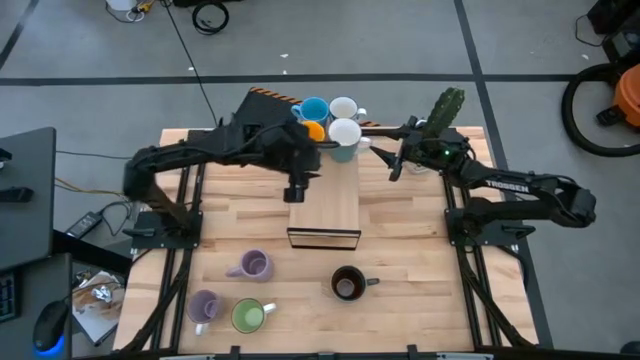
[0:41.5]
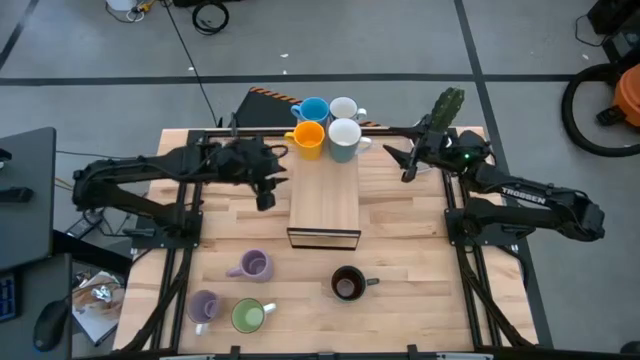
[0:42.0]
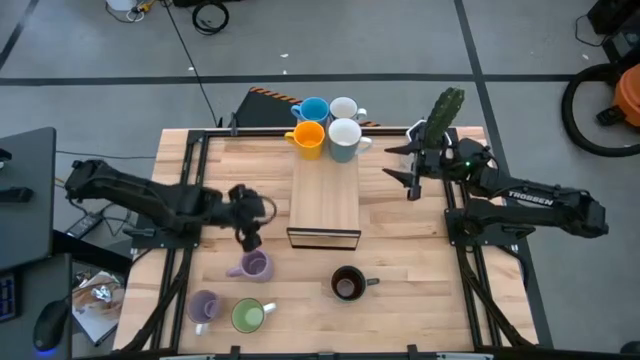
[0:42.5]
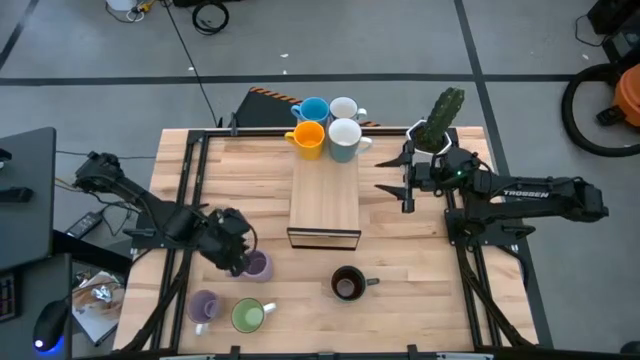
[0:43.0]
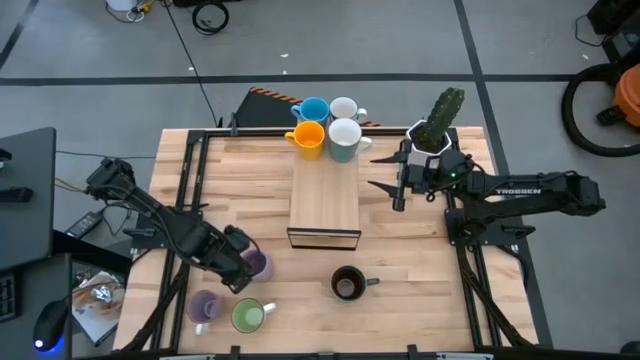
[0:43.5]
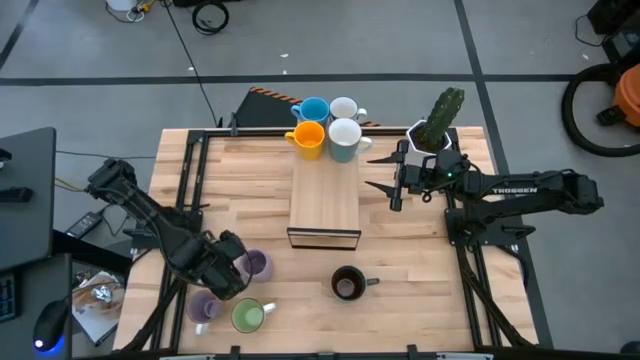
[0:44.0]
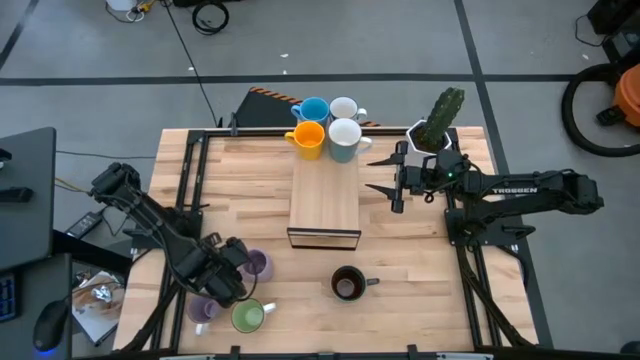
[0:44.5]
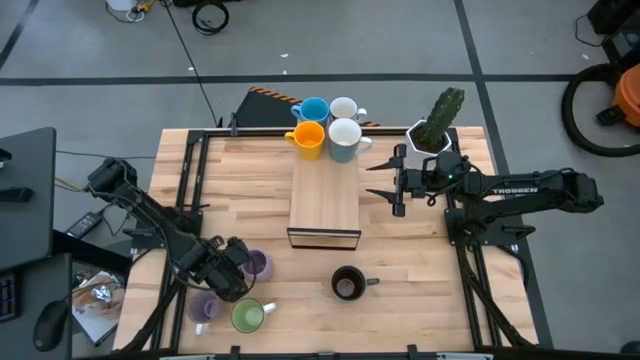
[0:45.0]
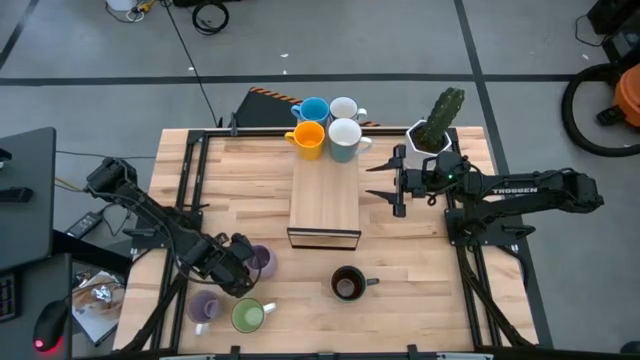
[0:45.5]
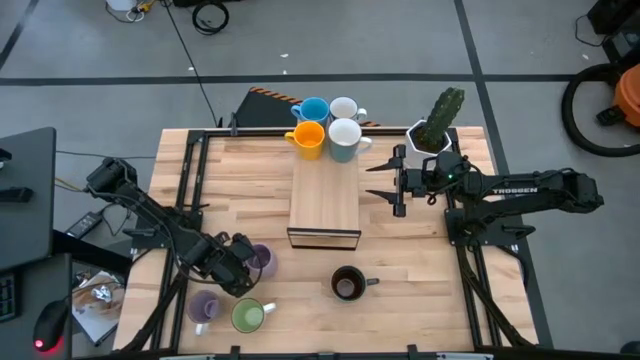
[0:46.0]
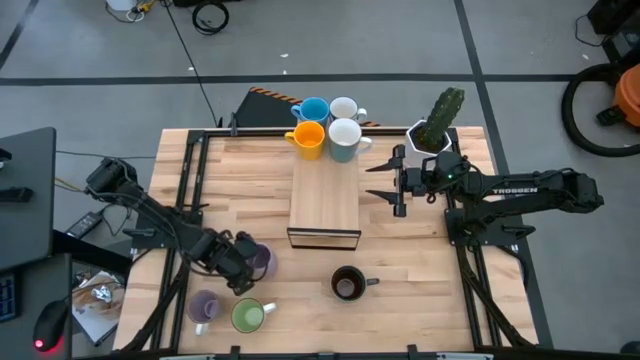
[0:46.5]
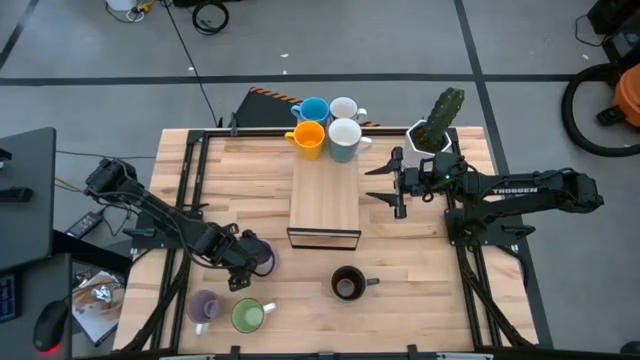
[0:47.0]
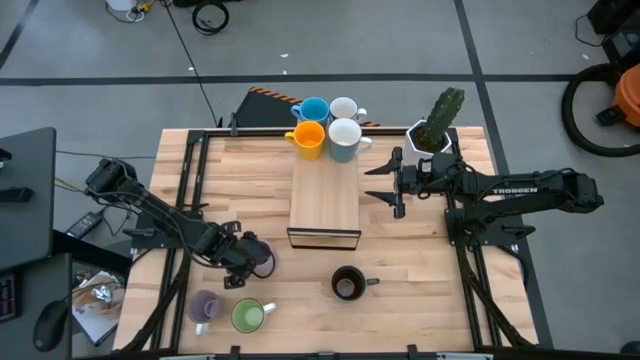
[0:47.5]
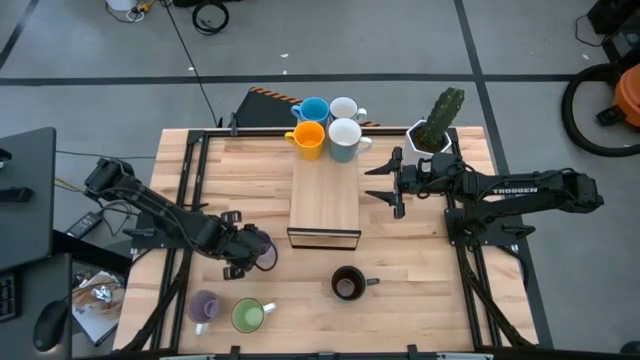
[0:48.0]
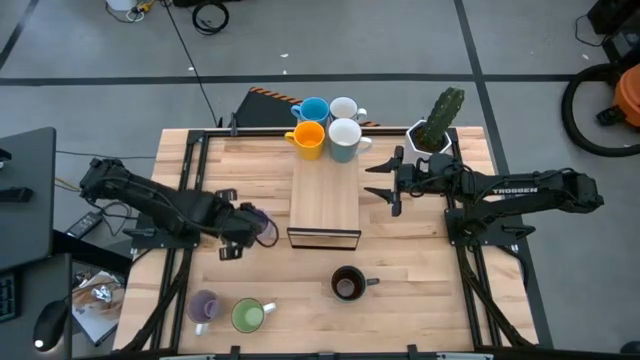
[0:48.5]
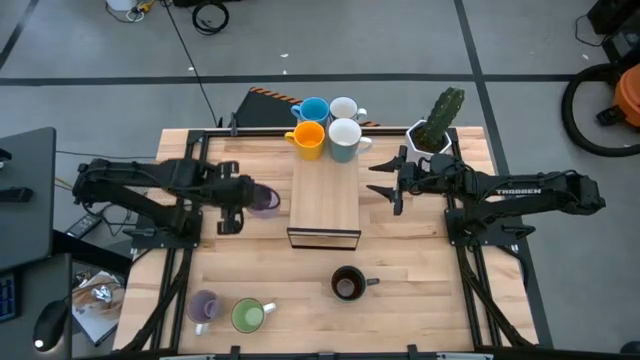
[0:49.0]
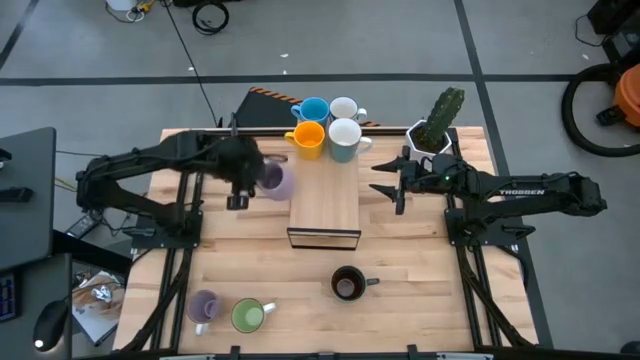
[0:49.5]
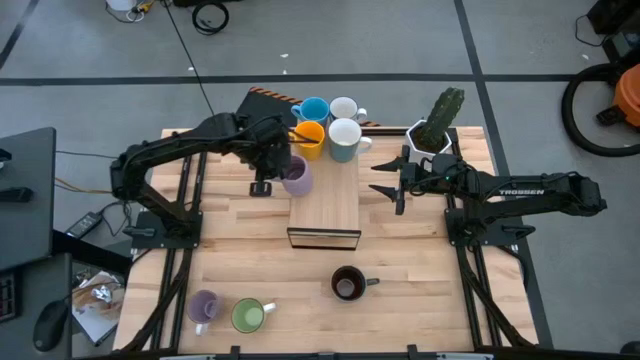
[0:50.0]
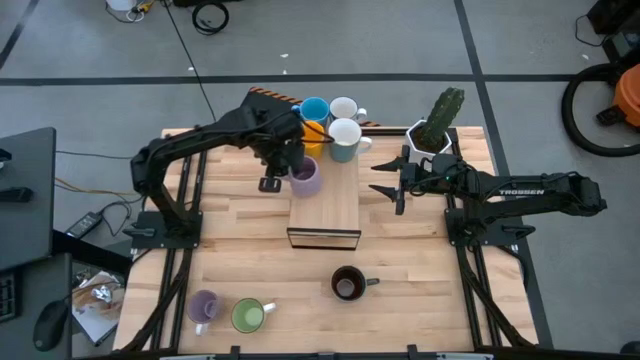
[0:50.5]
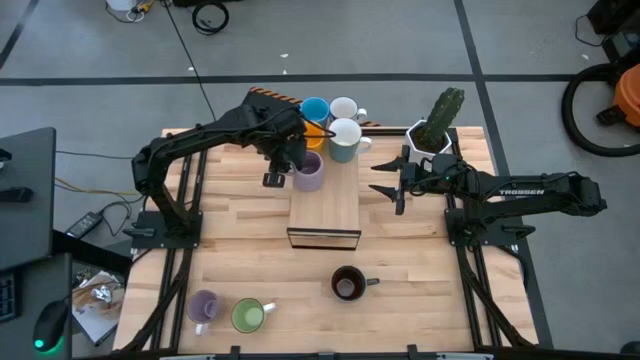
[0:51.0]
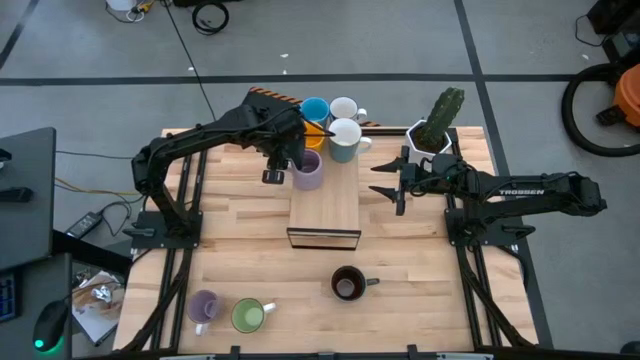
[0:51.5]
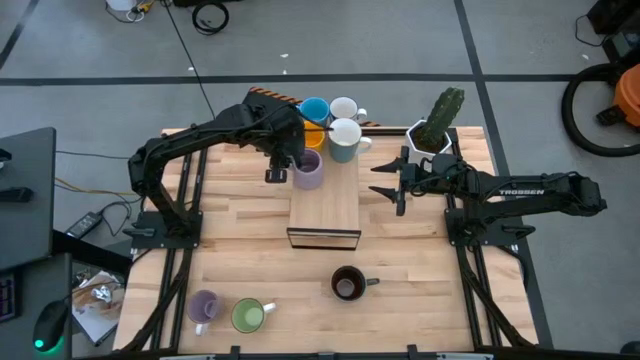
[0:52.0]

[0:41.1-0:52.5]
Task: Place coffee mugs
Put the top purple mug on the shelf

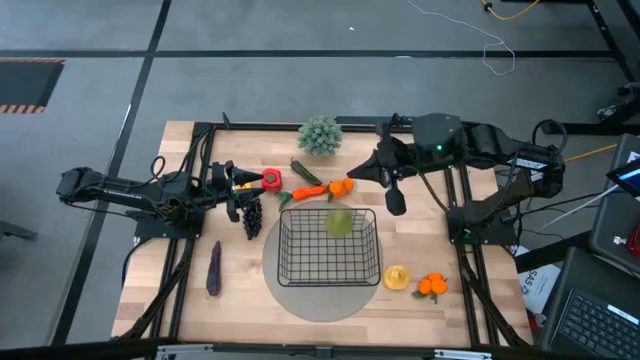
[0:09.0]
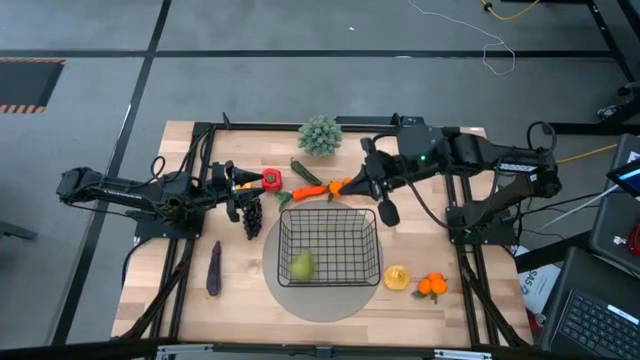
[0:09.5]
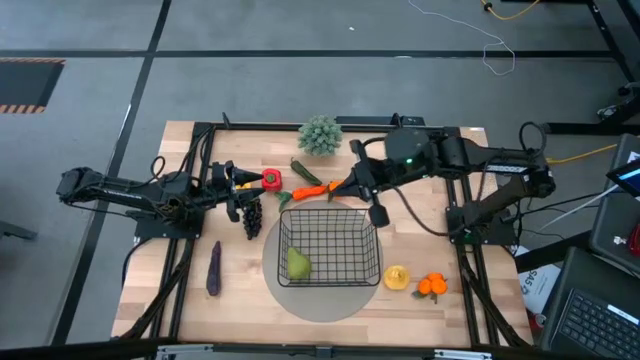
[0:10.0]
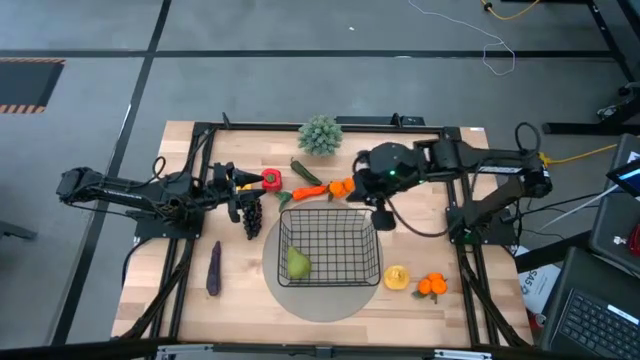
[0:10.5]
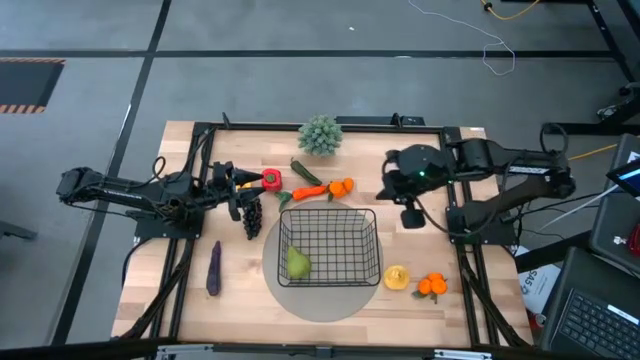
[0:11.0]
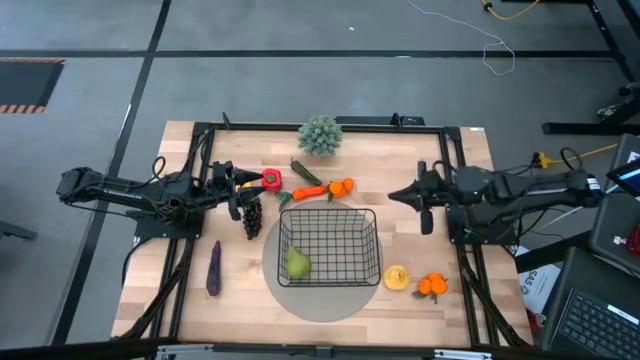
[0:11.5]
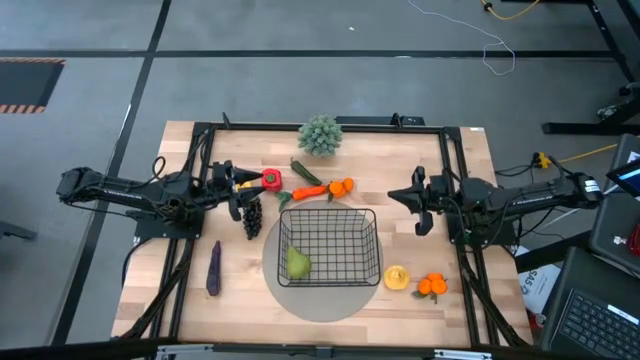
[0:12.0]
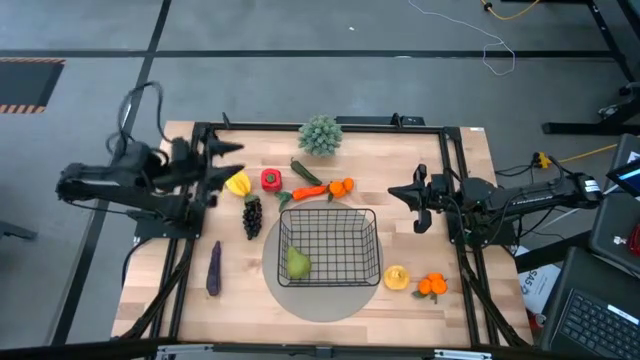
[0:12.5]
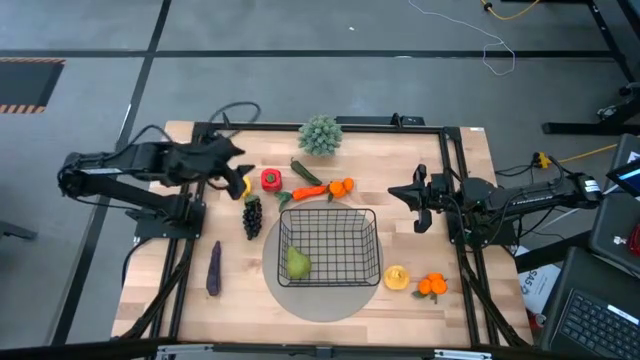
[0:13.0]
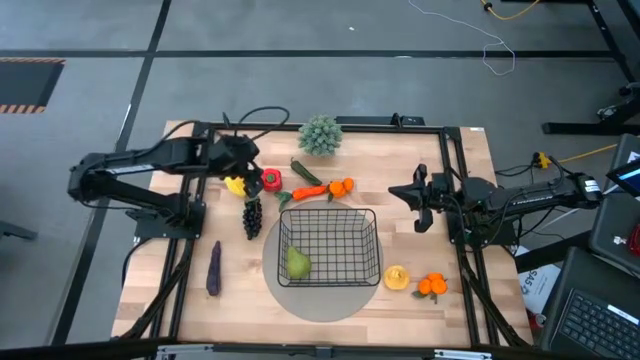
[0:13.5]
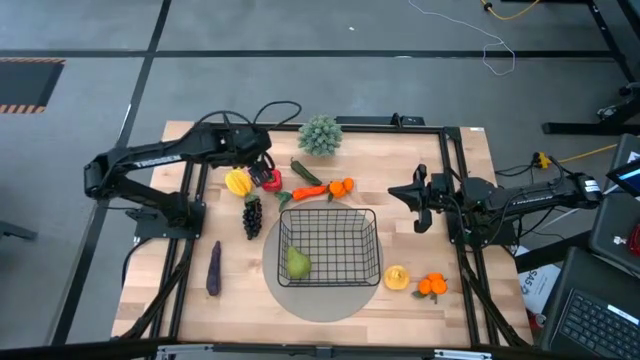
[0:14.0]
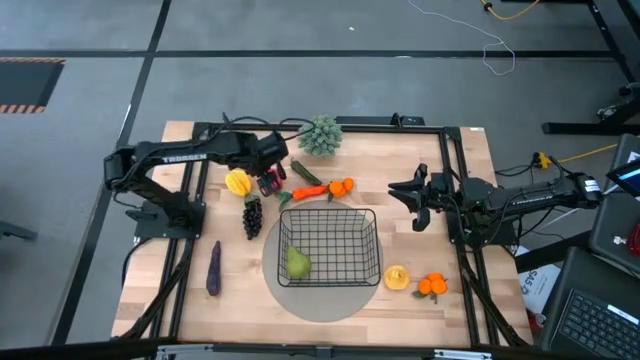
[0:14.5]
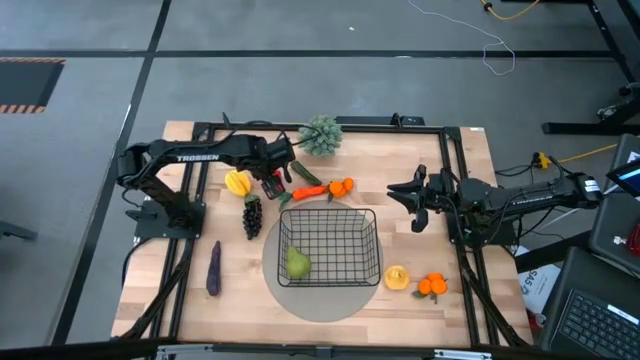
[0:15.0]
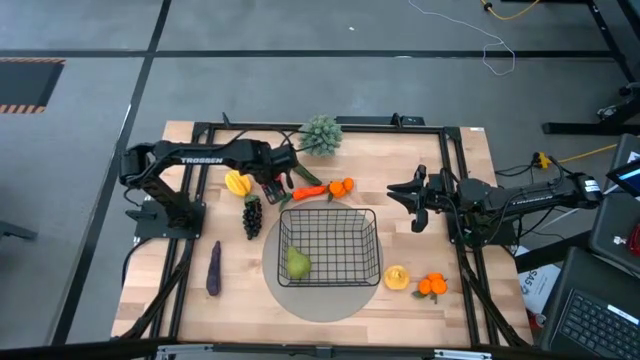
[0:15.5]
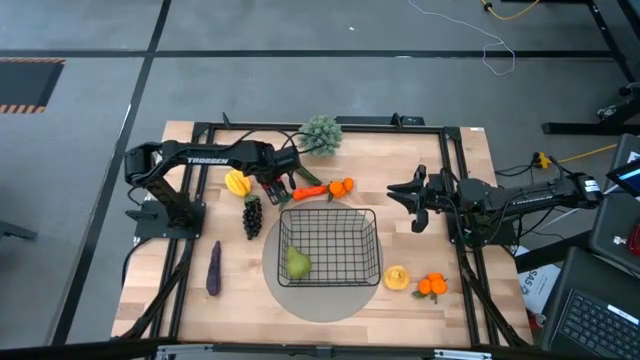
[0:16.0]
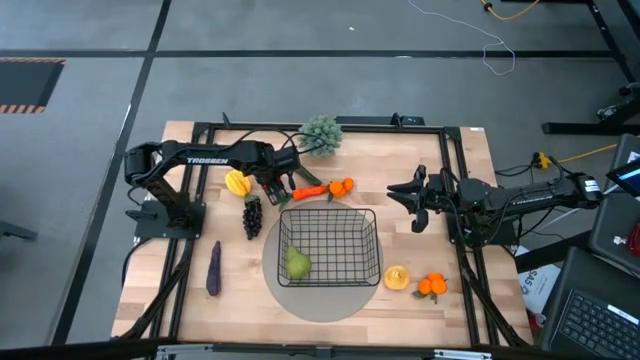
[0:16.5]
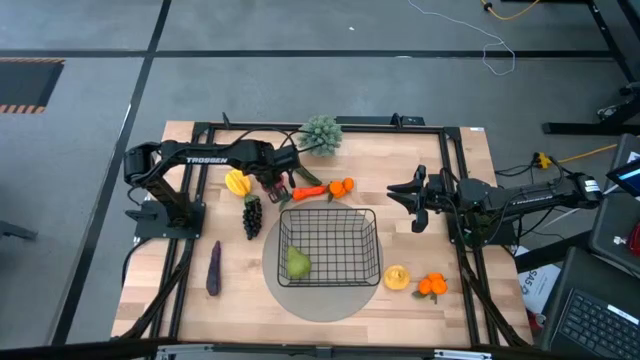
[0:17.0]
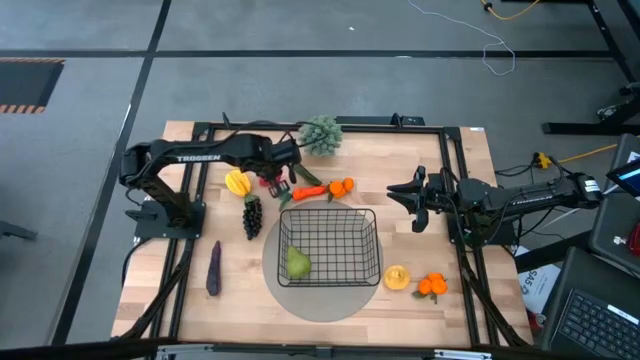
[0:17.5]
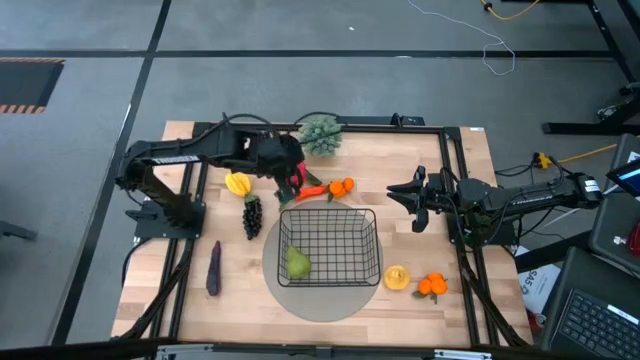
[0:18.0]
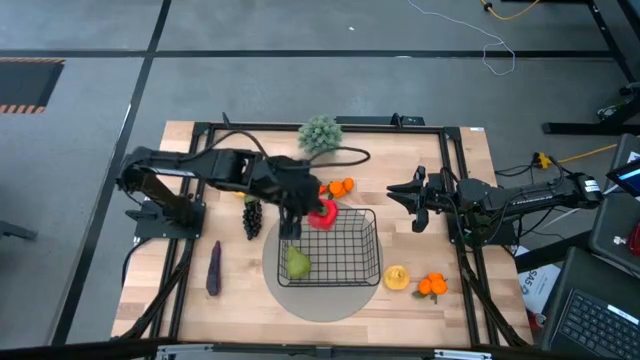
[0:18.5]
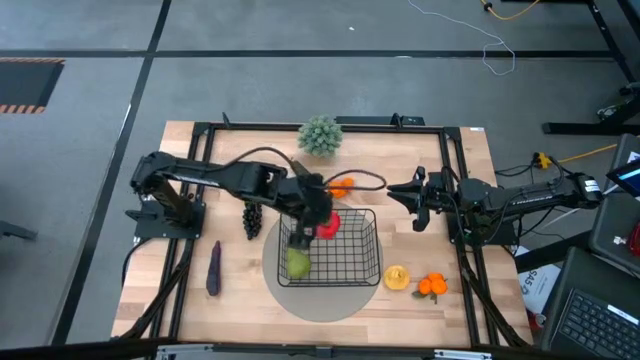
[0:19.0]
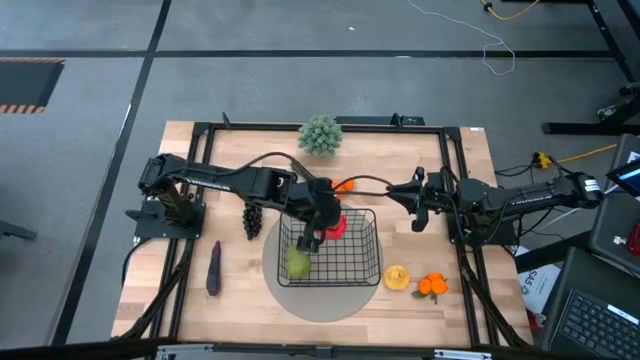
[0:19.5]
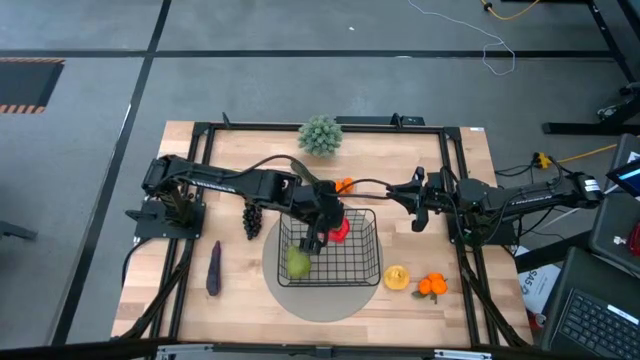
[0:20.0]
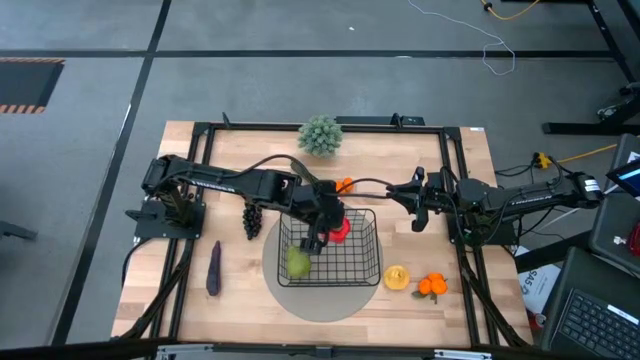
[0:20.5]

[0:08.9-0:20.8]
Task: Build produce basket
Put the red bell pepper into the black wire basket
